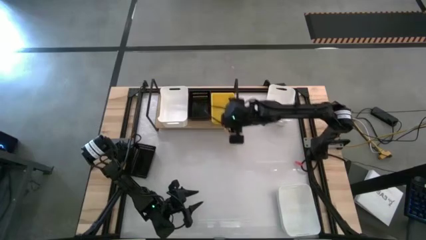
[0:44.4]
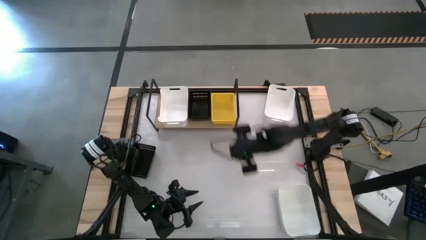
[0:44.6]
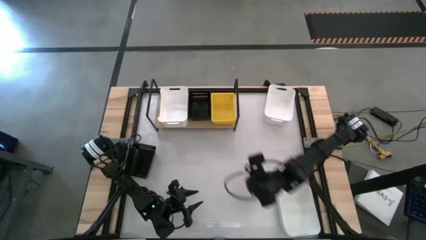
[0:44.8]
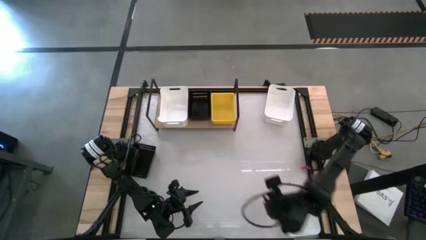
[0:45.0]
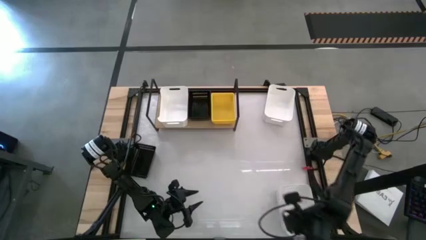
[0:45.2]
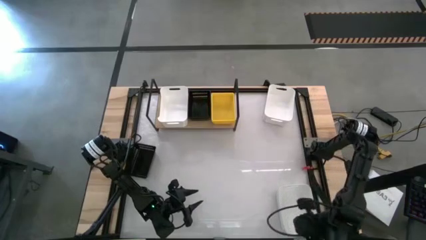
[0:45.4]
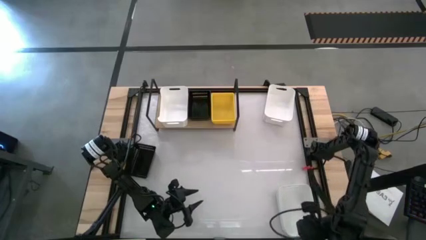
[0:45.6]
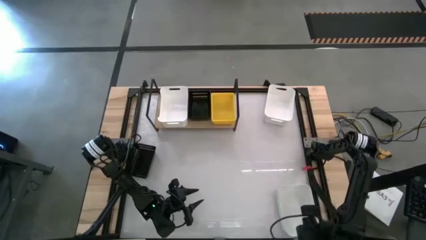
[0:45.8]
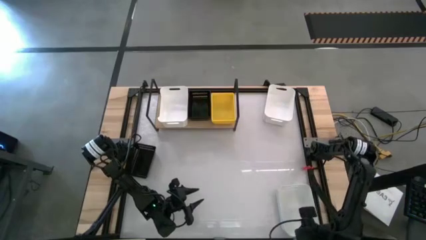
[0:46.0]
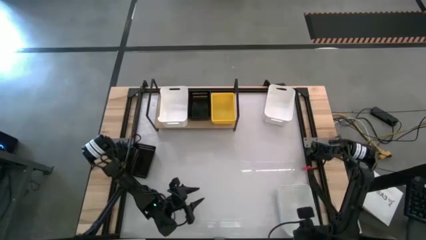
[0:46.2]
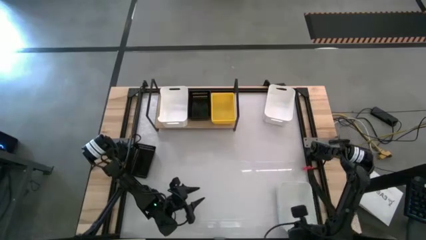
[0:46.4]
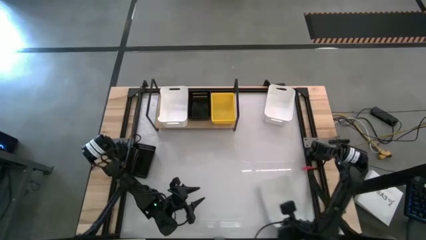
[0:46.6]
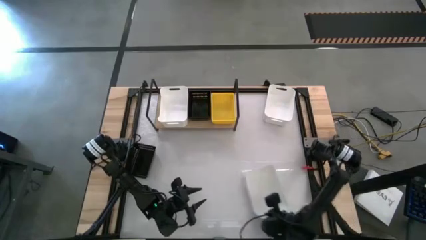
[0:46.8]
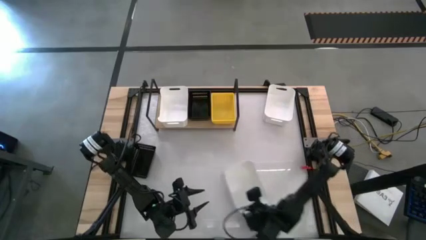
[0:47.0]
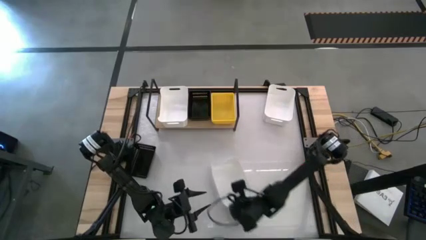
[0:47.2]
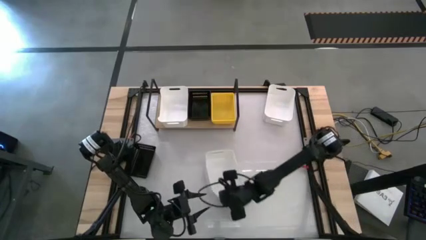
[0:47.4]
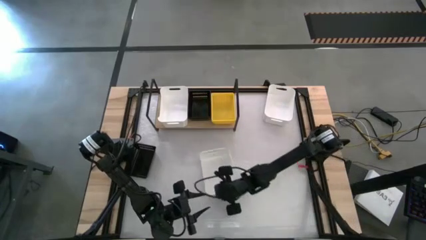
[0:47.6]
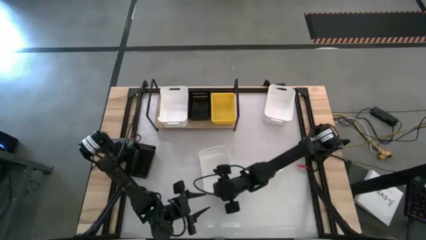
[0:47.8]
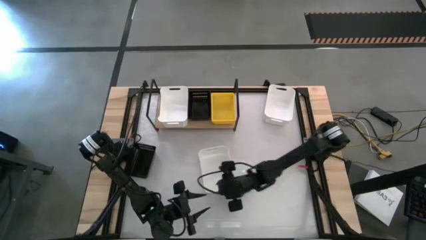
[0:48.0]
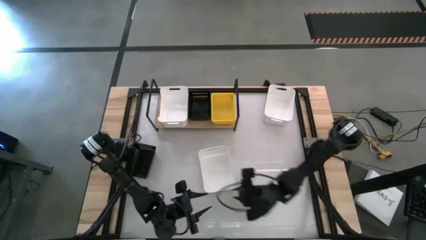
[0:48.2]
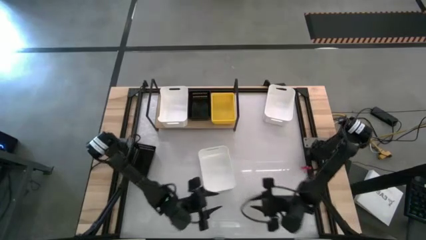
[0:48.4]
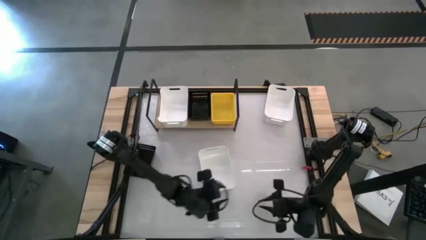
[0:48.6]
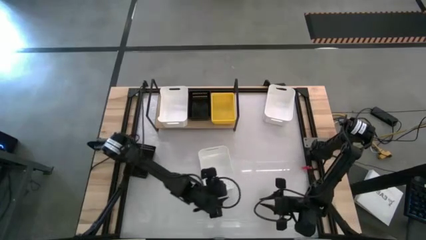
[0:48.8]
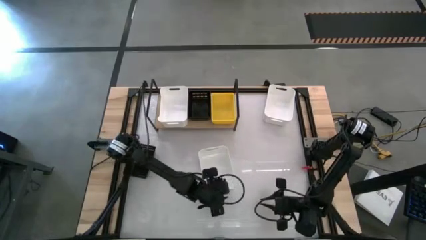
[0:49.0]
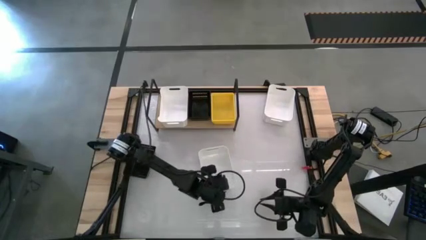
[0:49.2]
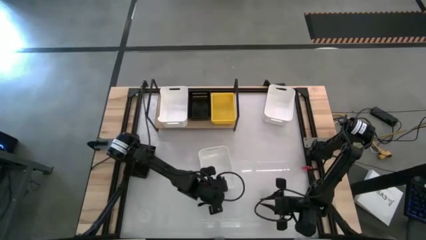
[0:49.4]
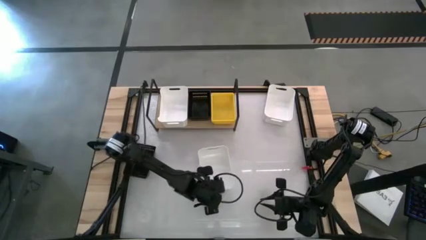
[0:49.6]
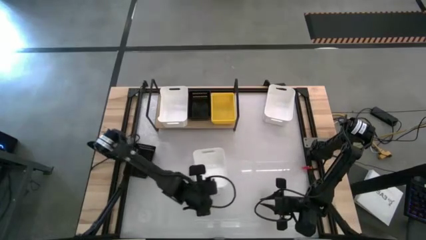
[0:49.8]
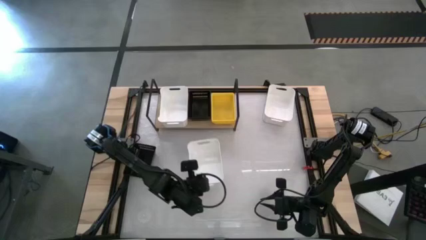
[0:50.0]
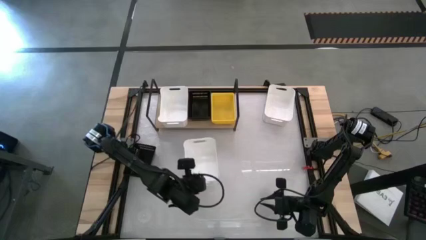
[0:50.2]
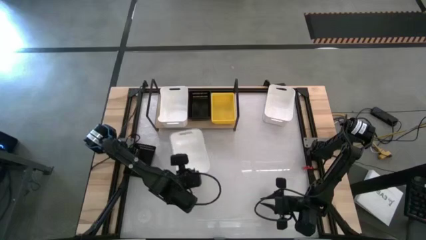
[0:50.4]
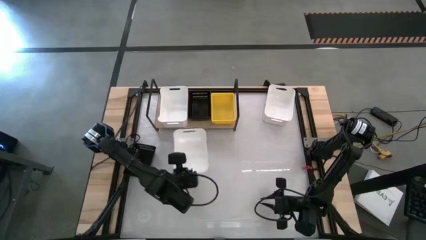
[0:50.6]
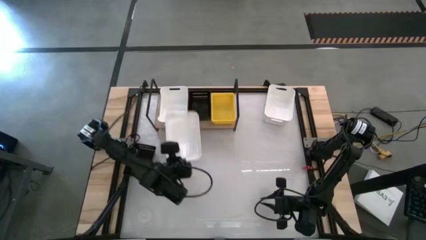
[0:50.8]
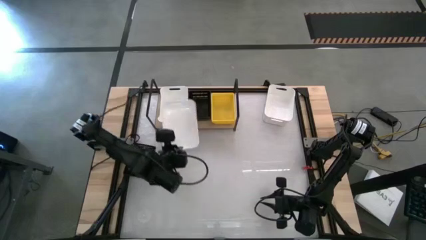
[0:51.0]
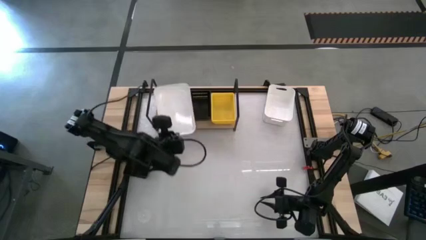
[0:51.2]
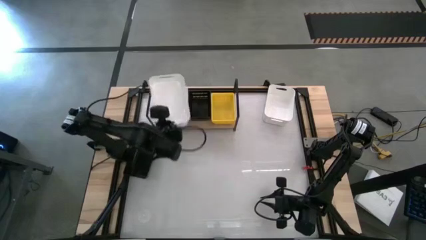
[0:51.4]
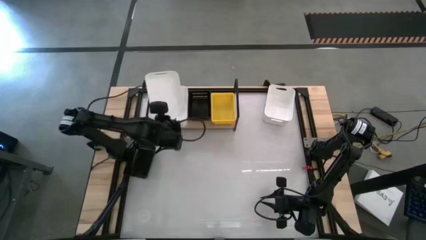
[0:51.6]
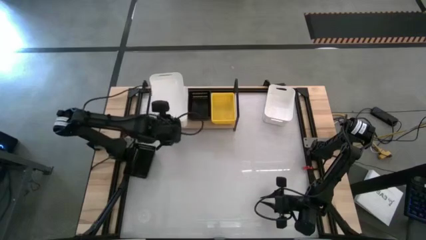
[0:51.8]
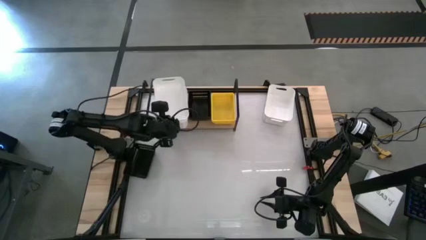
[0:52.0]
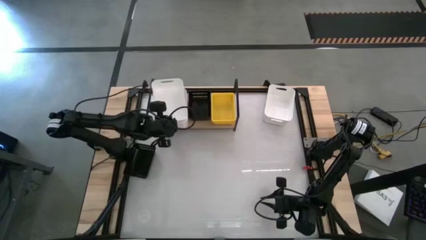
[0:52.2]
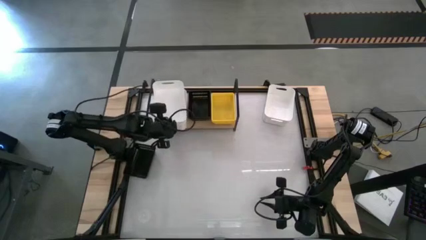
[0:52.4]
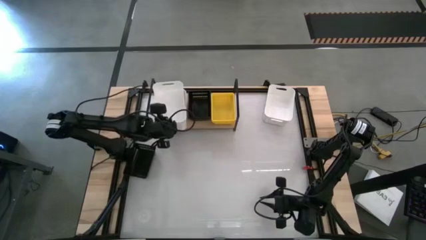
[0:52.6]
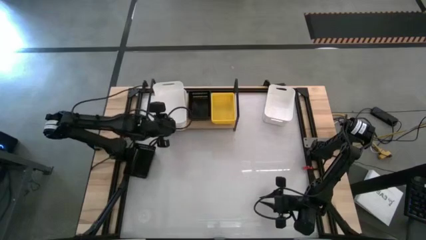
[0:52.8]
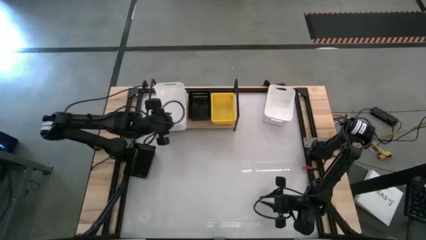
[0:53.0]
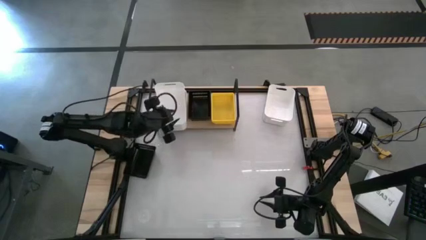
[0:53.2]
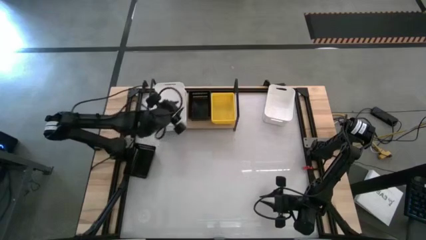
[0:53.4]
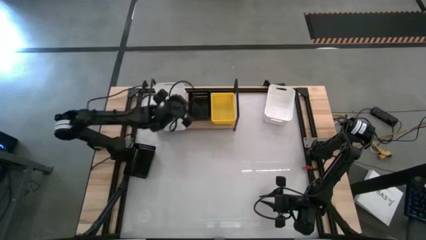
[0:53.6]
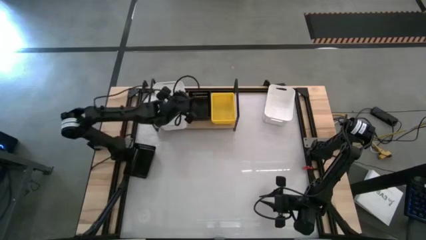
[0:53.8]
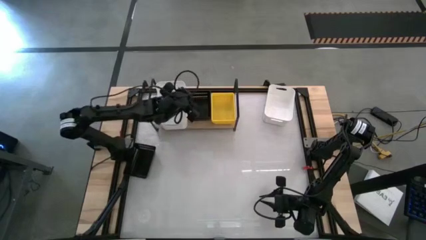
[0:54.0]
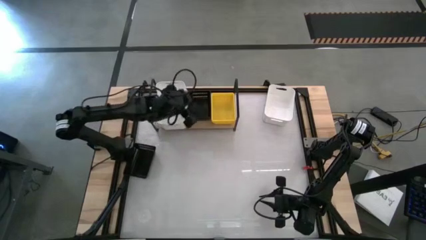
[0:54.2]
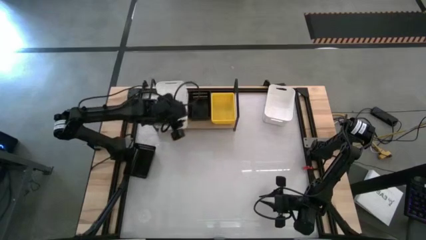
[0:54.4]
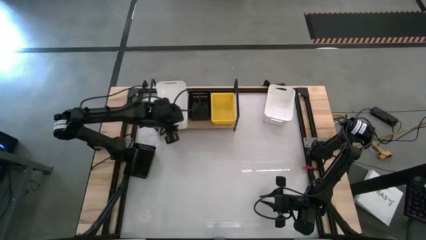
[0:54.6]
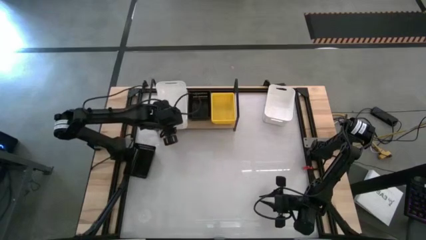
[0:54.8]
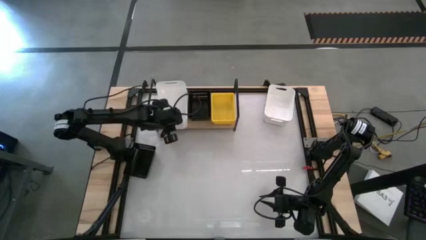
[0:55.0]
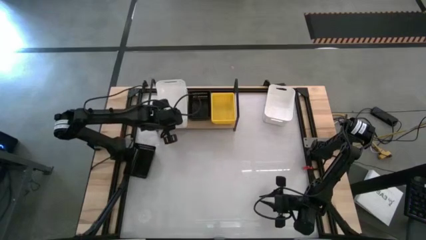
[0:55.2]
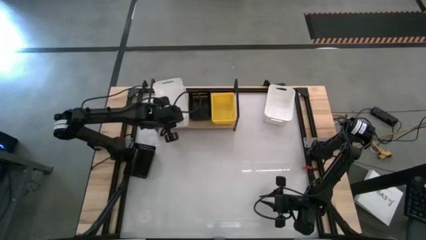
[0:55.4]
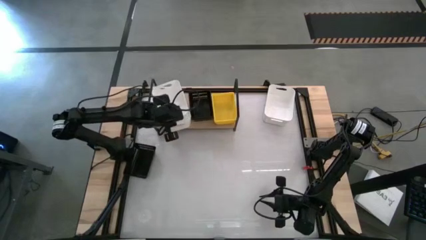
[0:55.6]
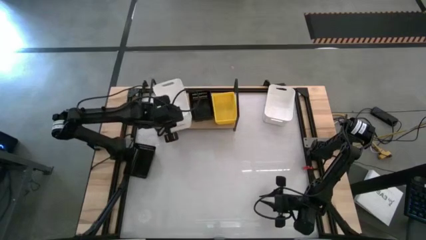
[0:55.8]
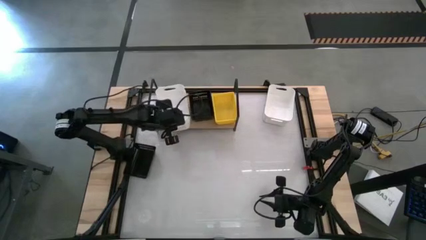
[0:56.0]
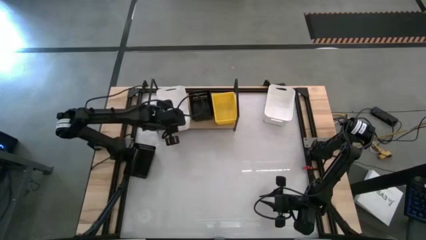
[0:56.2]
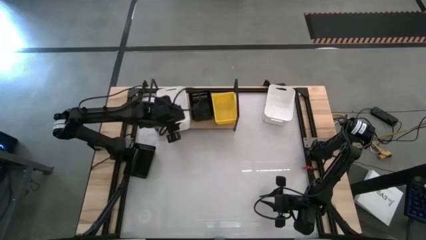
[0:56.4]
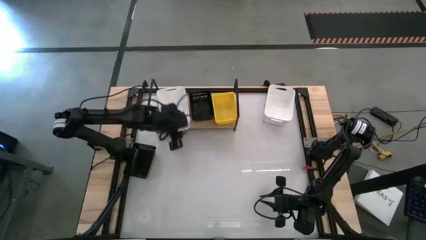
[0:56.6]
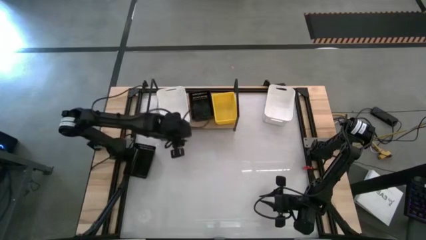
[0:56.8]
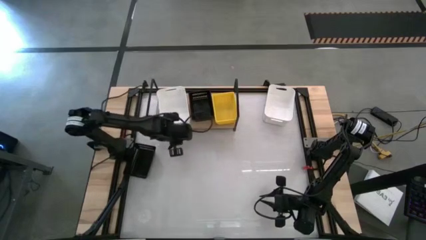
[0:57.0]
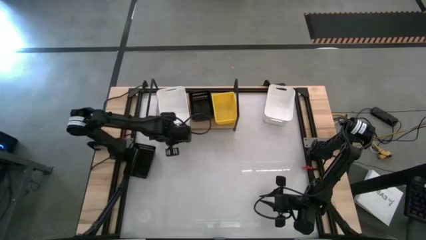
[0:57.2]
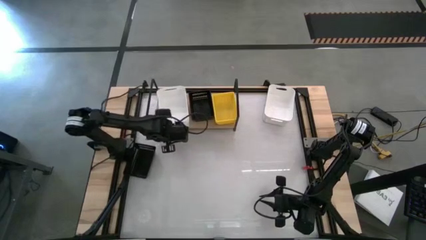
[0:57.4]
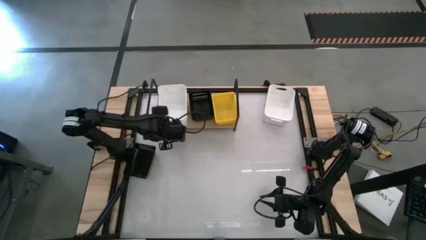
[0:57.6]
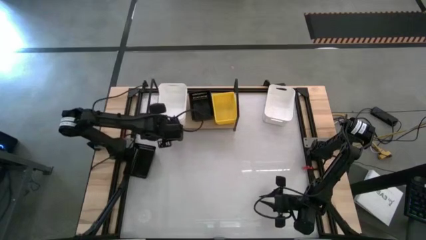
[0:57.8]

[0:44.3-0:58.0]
Task: Stack baskets on shelf by color
Stack the bottom white bin on top of the white bin

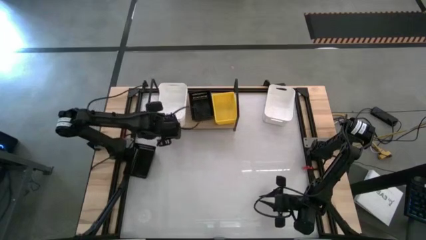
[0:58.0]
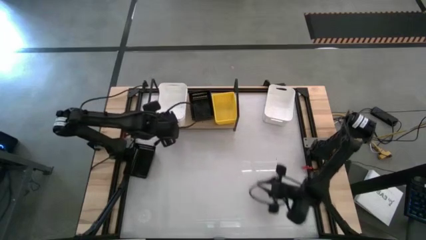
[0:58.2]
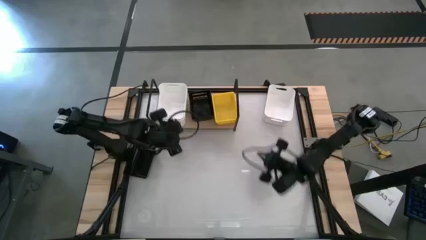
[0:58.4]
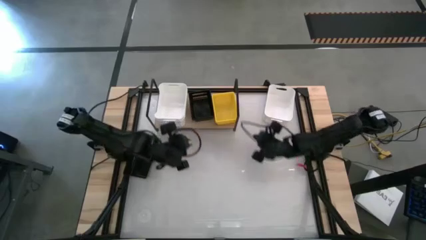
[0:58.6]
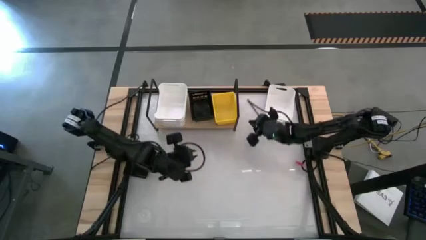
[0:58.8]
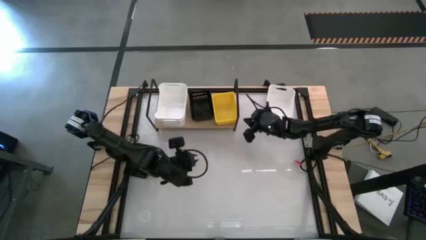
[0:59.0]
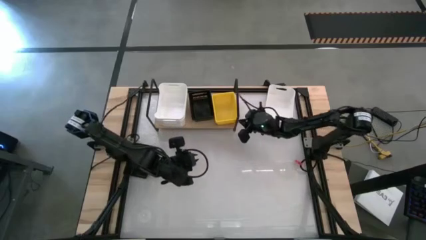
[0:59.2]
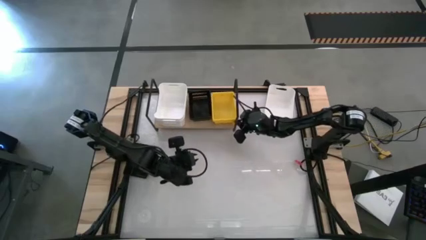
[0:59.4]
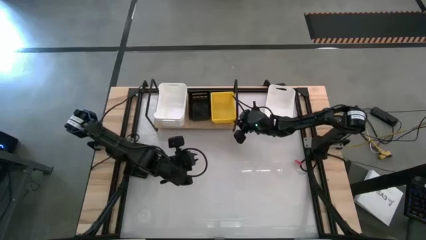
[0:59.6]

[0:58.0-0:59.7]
Adjust the stacked yellow bins on the shelf
